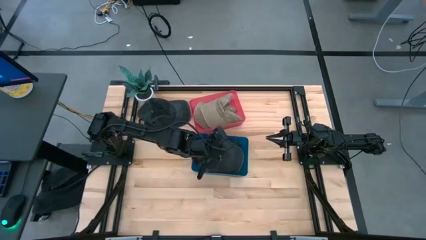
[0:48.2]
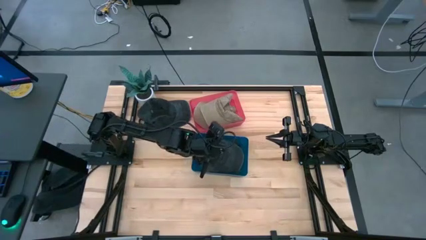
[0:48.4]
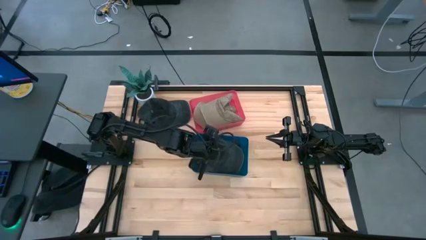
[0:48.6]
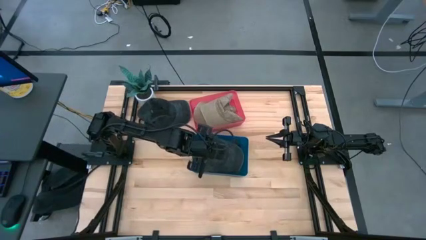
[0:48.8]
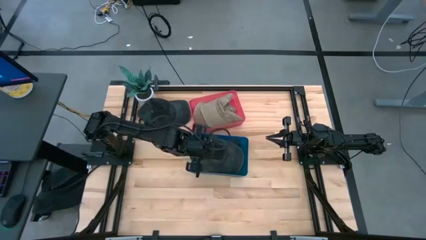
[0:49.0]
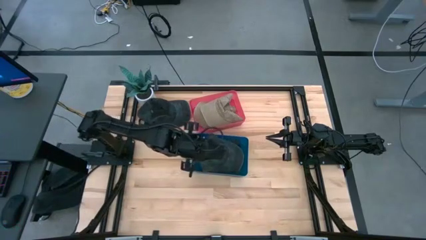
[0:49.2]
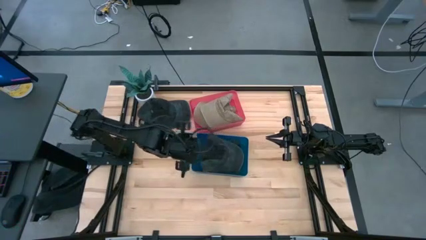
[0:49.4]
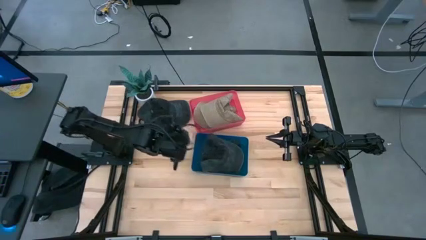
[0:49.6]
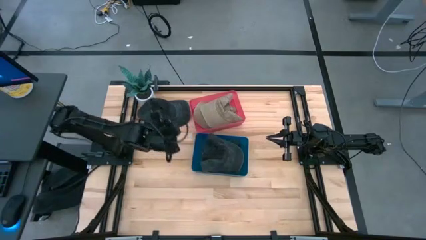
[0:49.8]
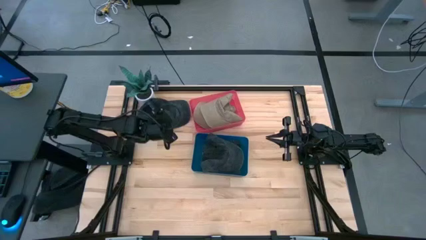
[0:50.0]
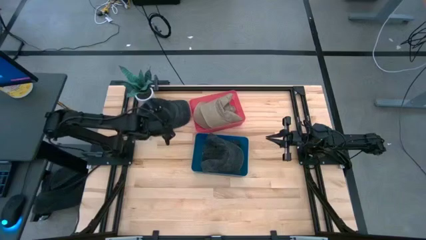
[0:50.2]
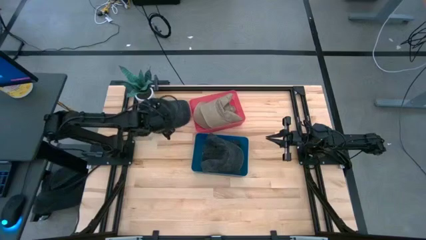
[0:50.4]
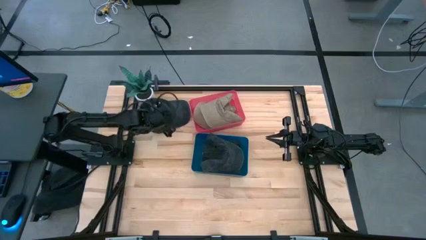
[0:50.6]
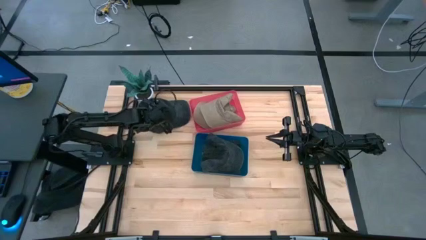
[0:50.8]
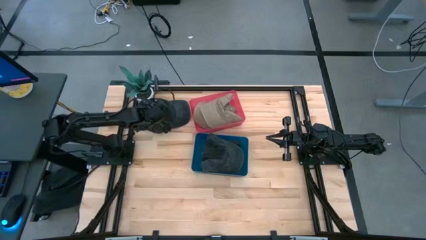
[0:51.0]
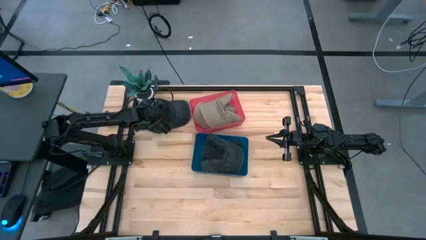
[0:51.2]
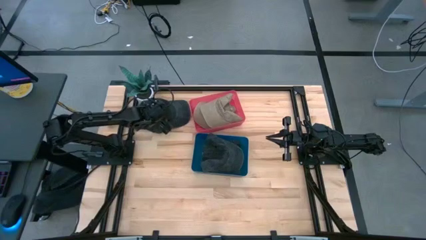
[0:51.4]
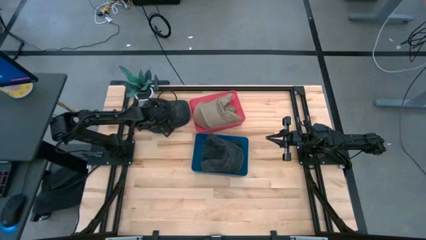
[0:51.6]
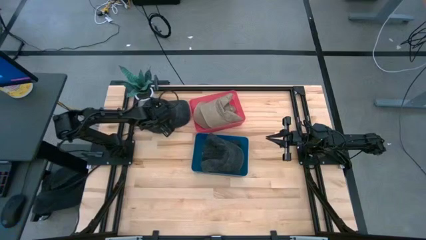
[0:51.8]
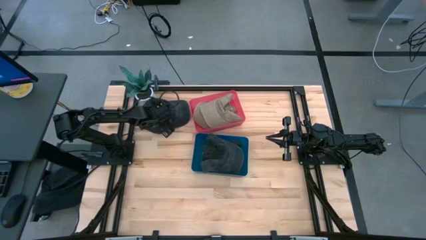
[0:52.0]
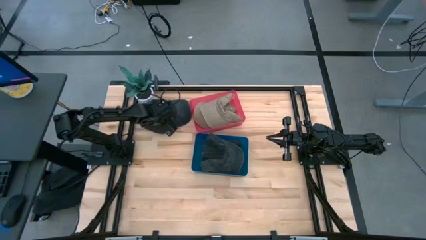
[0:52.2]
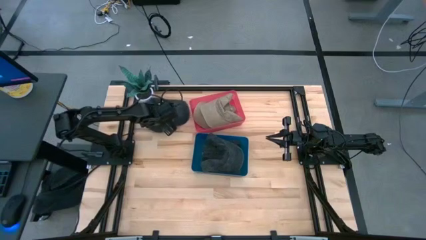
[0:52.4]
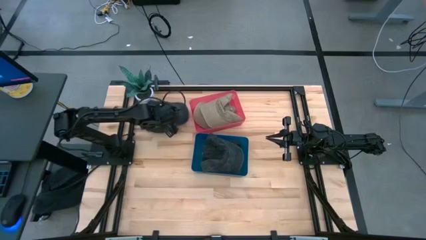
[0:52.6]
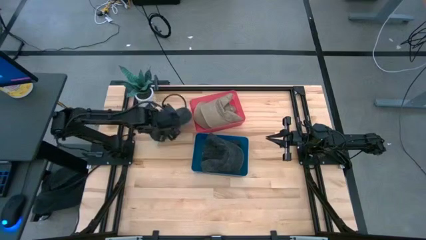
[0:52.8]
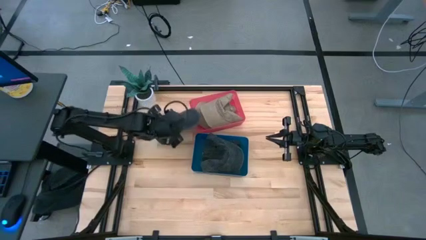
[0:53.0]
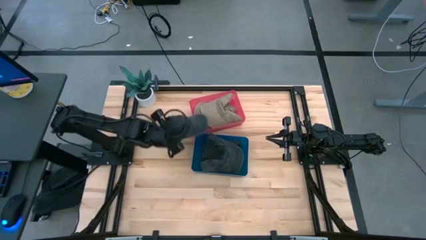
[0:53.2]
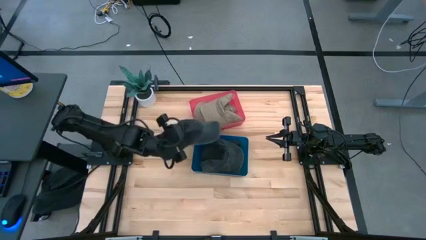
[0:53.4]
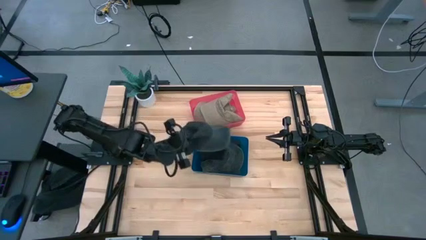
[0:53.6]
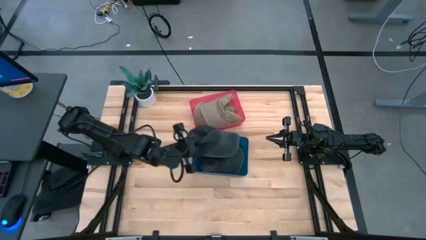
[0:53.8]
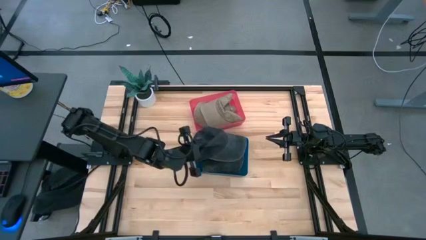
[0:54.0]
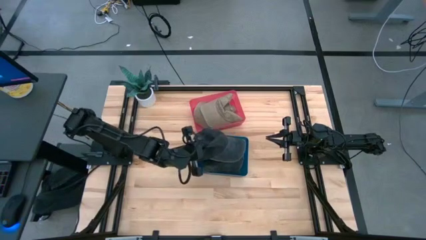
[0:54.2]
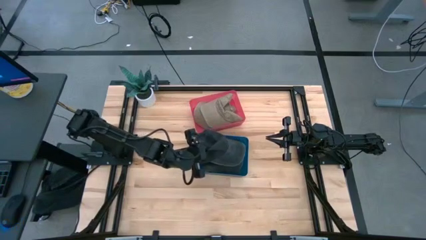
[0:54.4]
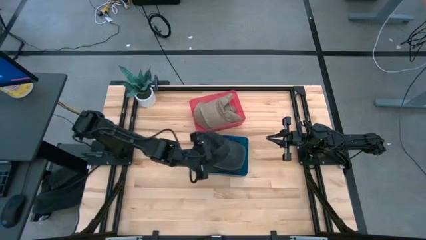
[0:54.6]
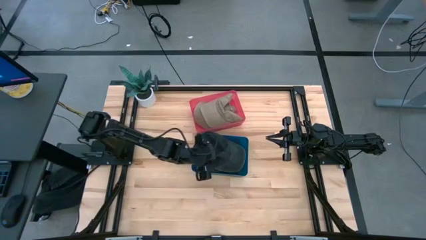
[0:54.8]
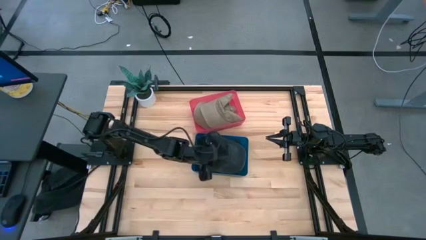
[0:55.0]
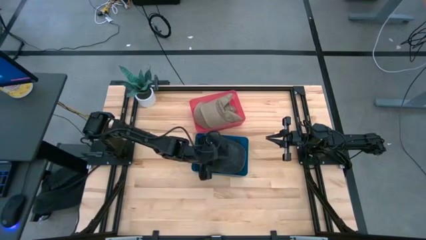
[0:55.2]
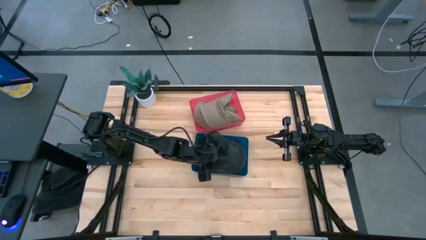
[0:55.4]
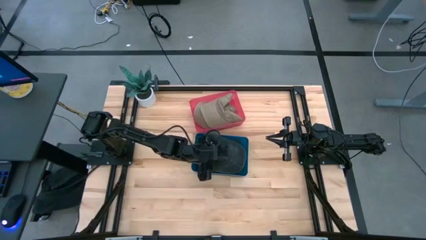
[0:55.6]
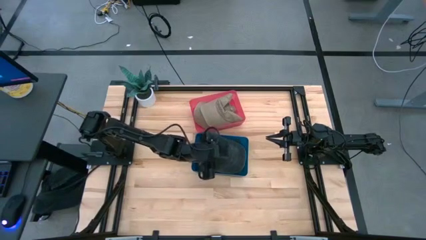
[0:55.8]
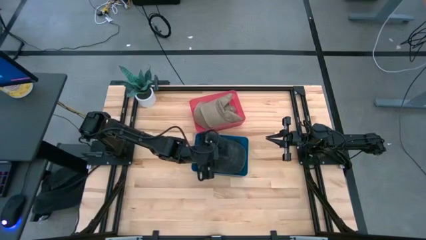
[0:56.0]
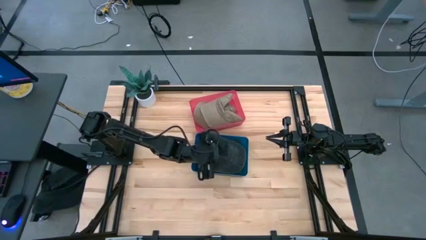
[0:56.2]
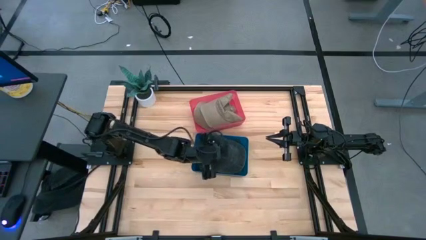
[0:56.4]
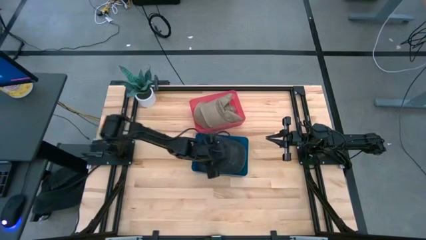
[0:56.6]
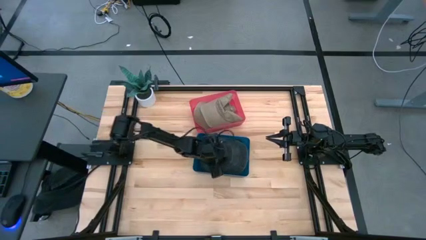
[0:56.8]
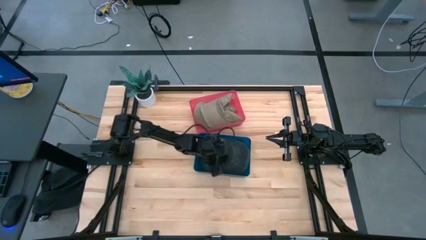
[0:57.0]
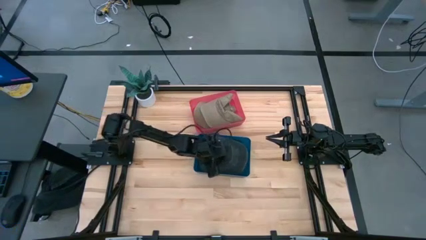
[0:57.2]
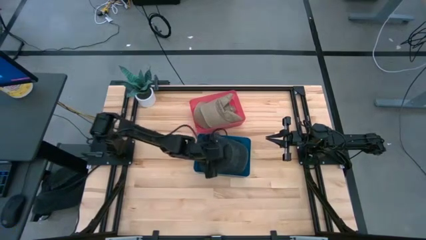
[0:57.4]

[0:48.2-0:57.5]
Task: Pick & Place hat
Put the black cap into the blue bin
